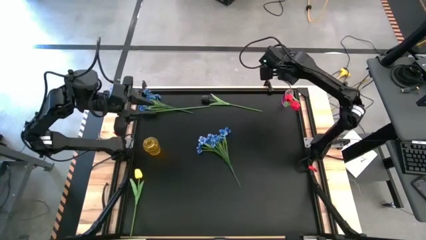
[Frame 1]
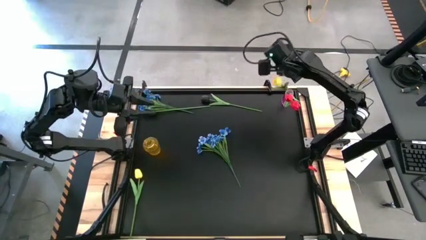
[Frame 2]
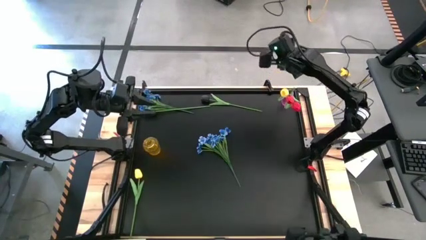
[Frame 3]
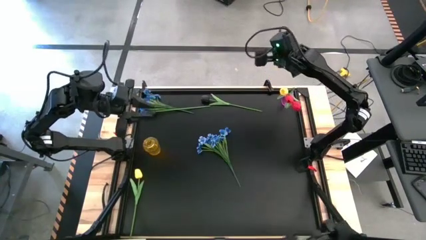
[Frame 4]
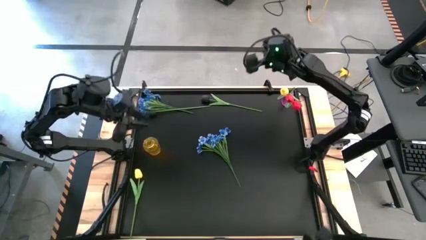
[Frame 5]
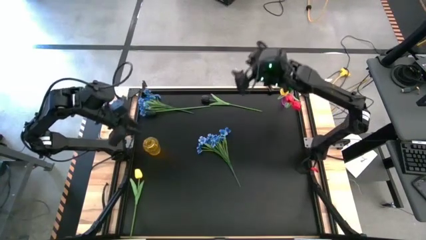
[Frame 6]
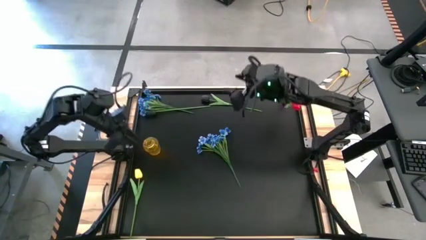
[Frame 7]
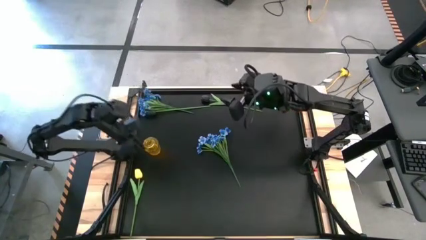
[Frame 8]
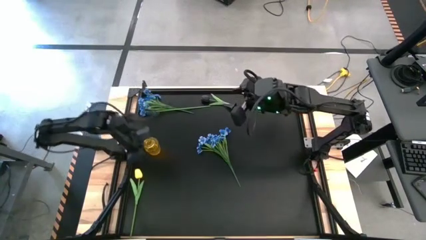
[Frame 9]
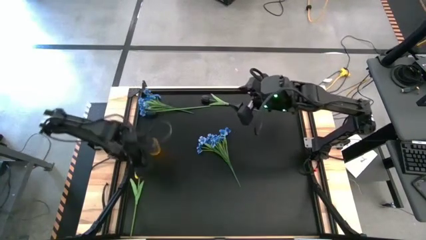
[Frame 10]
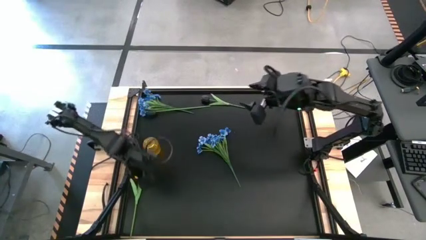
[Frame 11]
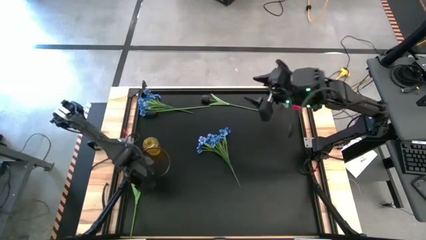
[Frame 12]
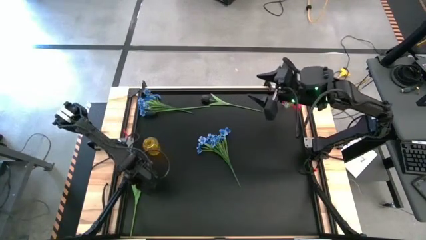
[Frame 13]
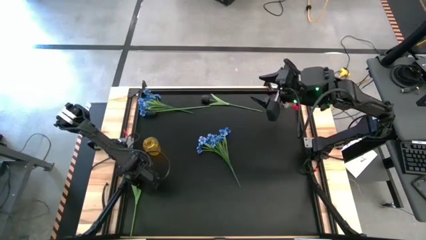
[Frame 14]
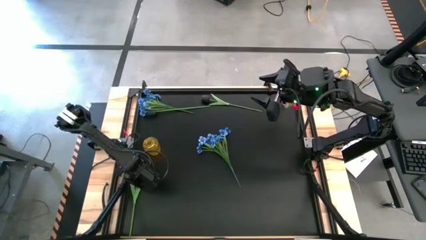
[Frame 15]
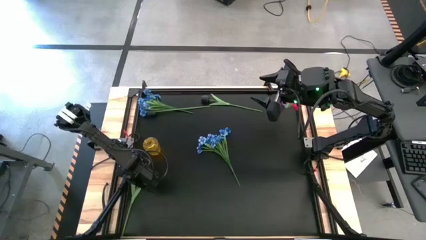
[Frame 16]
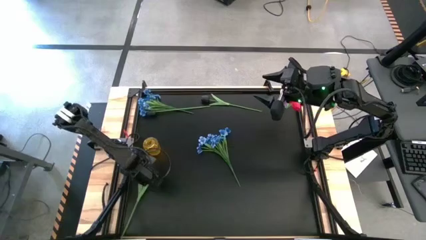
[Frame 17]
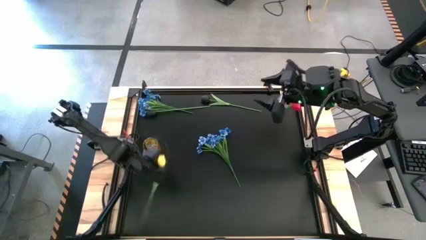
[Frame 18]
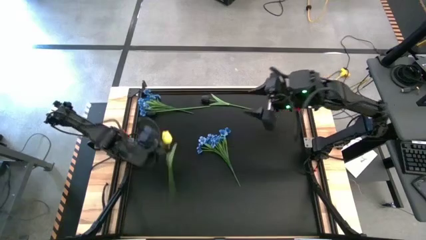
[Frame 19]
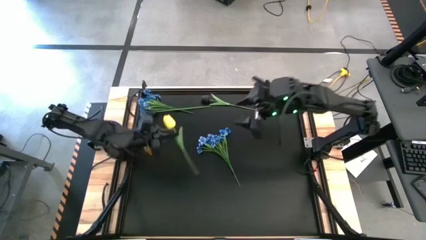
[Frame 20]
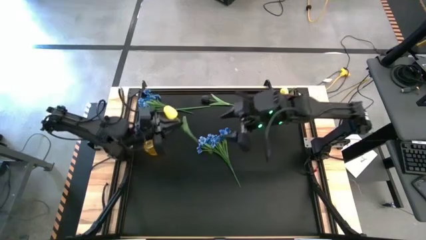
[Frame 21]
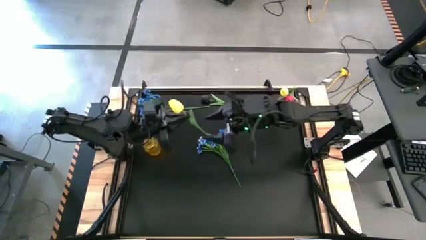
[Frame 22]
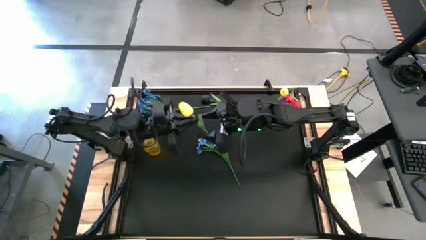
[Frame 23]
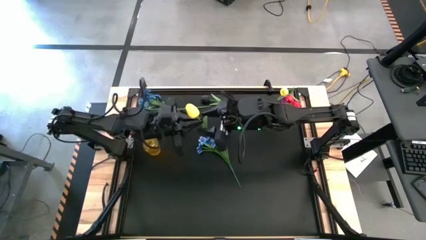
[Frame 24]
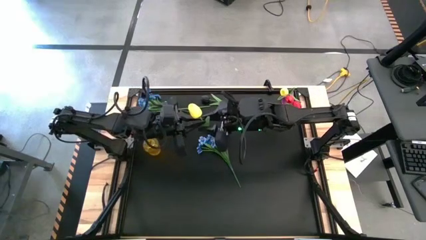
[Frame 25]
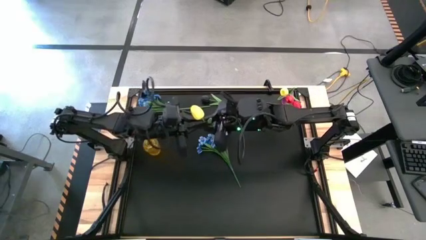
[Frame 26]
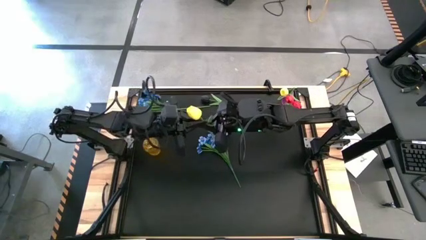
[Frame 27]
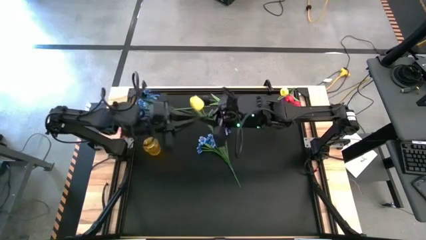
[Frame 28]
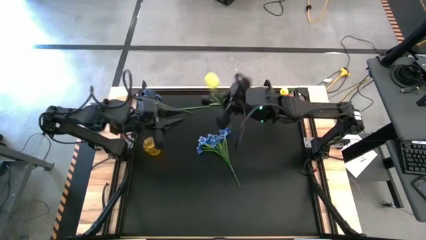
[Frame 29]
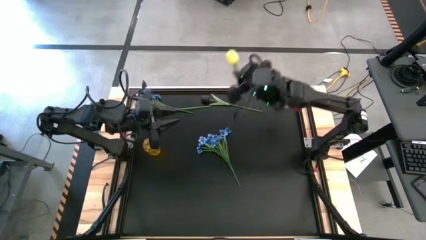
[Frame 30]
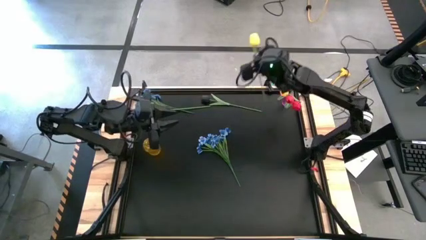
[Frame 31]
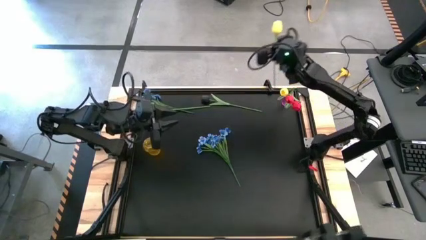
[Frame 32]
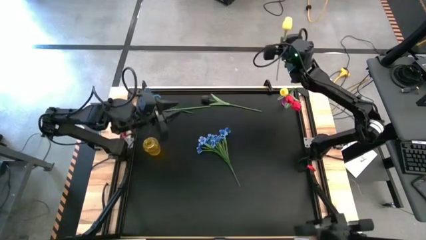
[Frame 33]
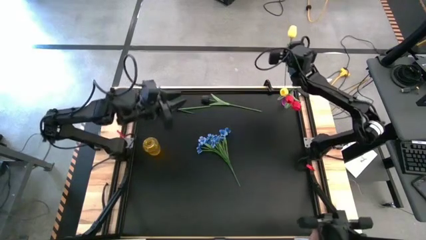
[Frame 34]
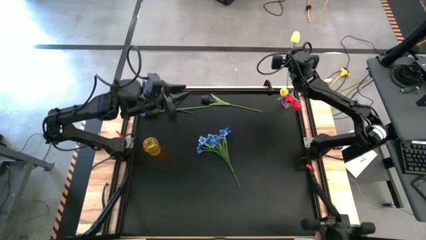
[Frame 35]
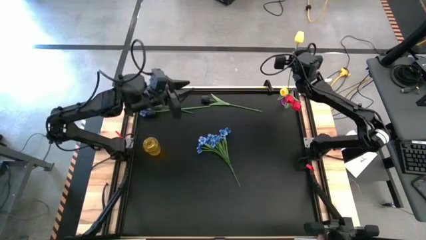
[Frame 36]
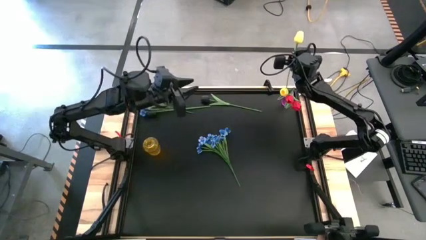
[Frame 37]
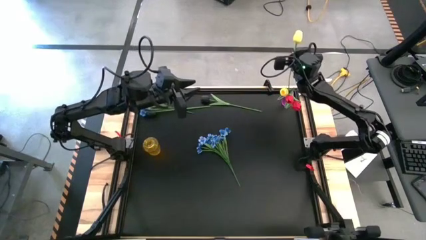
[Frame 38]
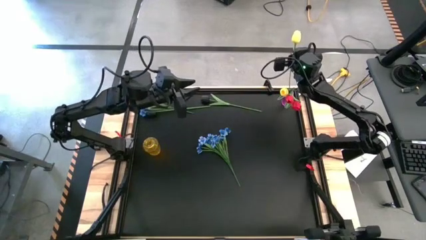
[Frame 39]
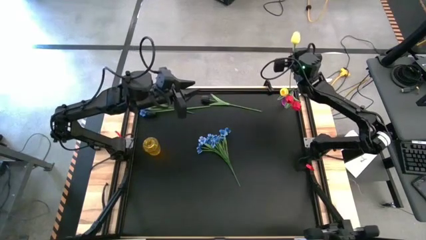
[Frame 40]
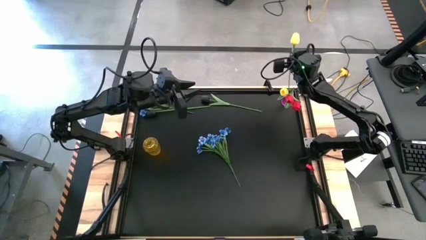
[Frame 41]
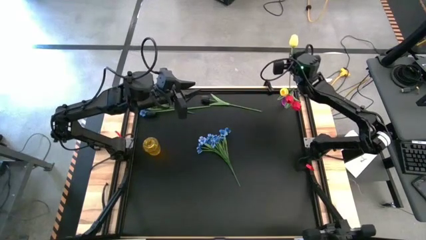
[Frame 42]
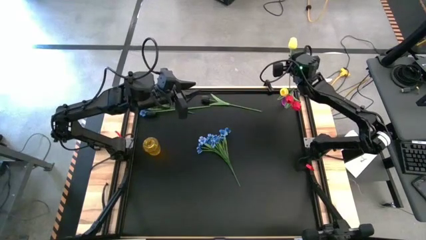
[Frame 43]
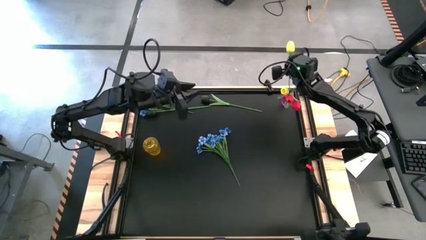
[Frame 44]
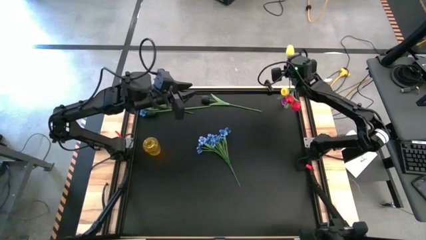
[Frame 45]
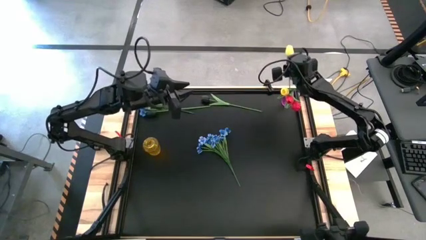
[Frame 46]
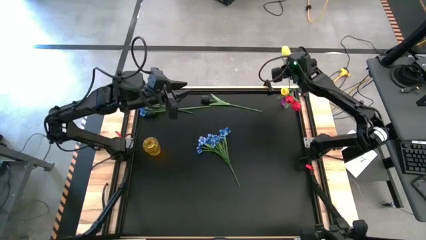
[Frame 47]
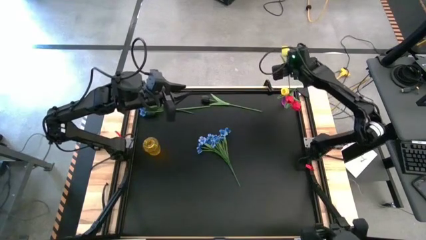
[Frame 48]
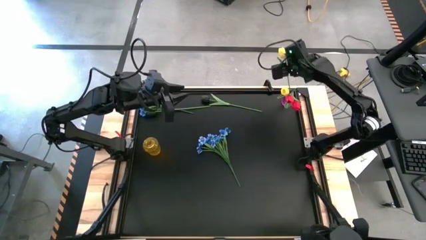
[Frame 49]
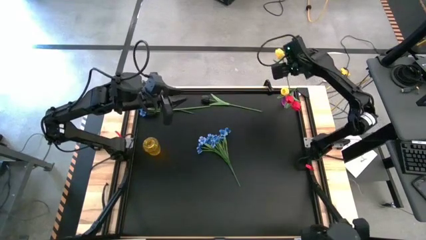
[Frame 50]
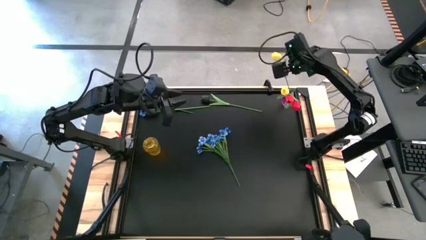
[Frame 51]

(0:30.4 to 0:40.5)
Task: Sort flowers into vase by color
Put the yellow flower into the purple vase

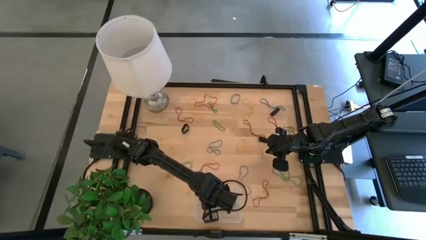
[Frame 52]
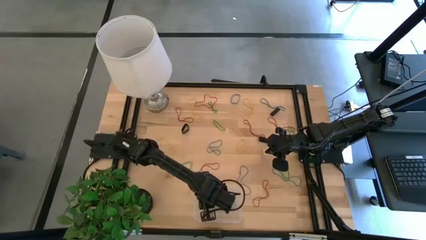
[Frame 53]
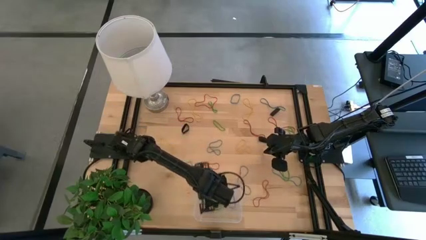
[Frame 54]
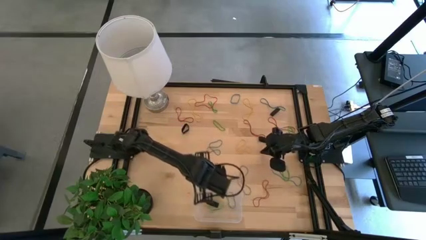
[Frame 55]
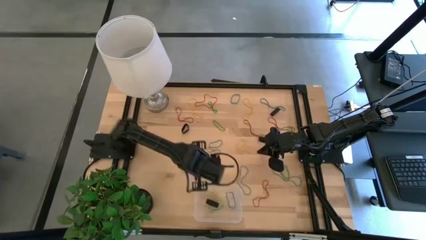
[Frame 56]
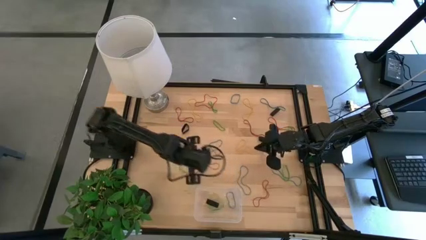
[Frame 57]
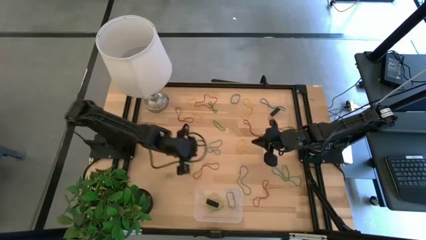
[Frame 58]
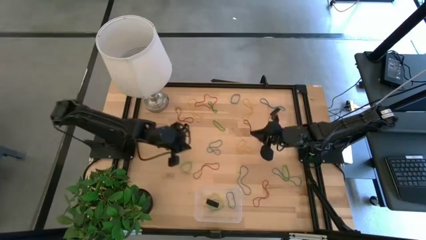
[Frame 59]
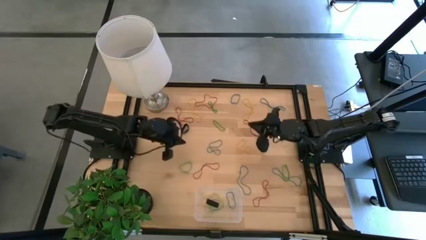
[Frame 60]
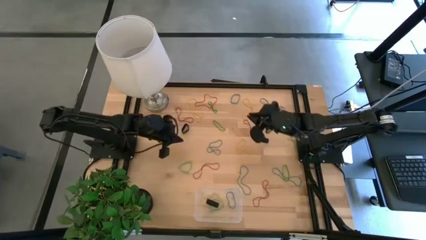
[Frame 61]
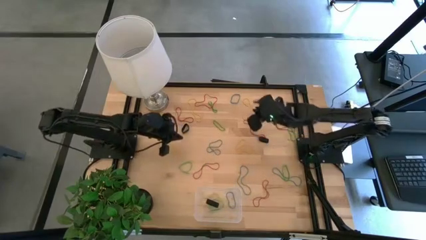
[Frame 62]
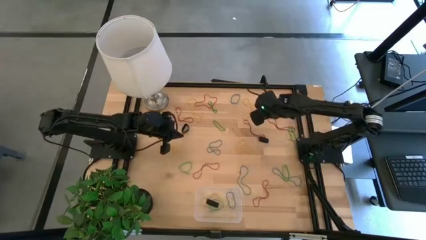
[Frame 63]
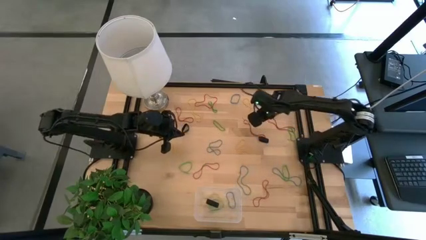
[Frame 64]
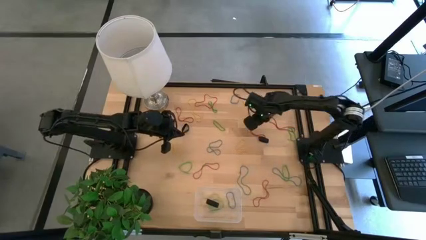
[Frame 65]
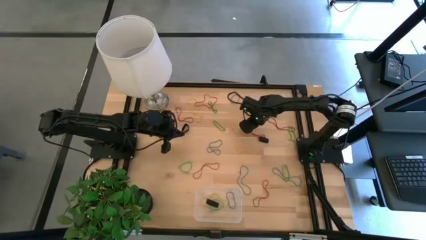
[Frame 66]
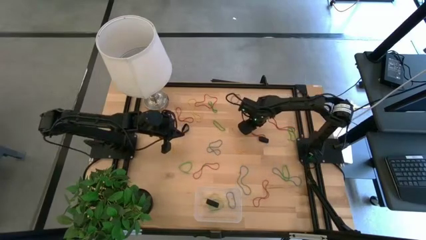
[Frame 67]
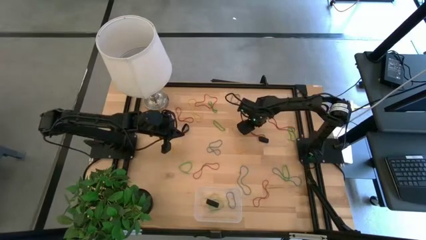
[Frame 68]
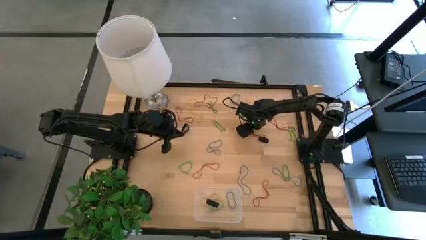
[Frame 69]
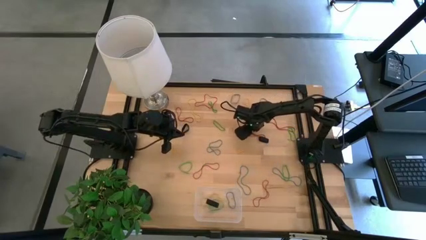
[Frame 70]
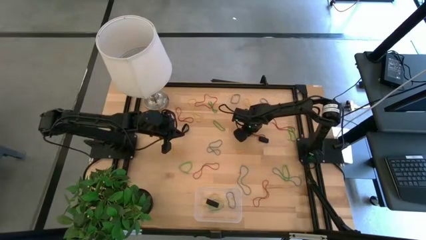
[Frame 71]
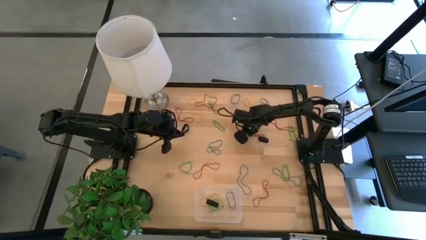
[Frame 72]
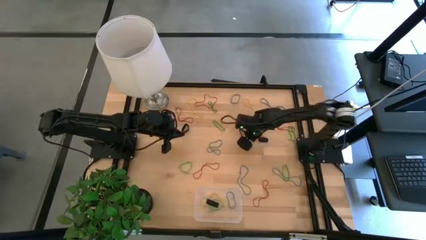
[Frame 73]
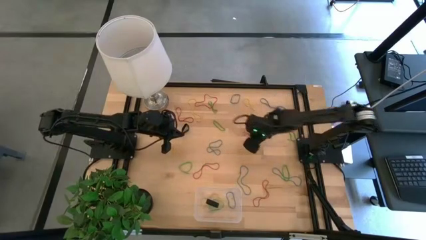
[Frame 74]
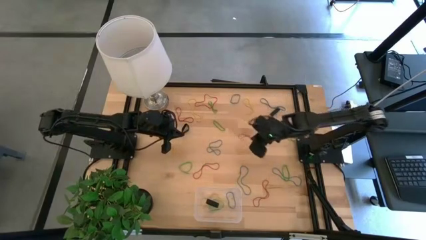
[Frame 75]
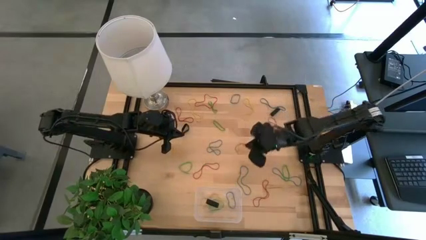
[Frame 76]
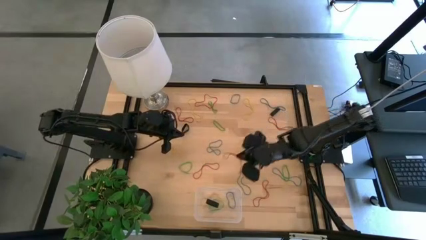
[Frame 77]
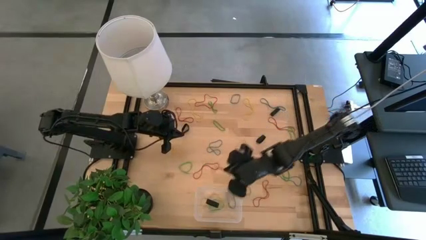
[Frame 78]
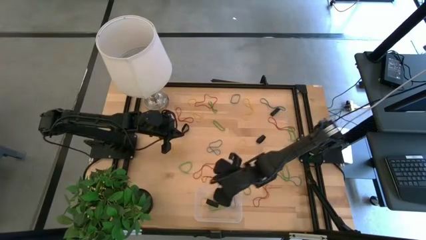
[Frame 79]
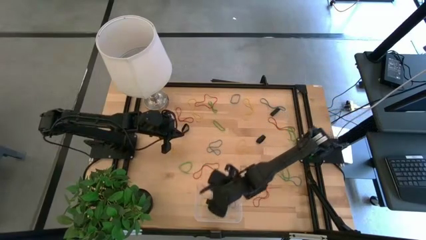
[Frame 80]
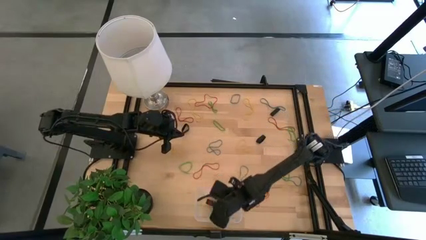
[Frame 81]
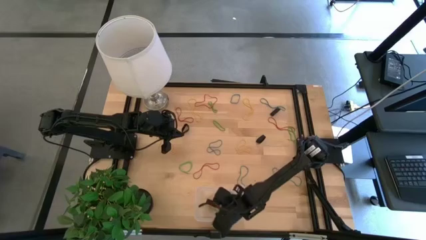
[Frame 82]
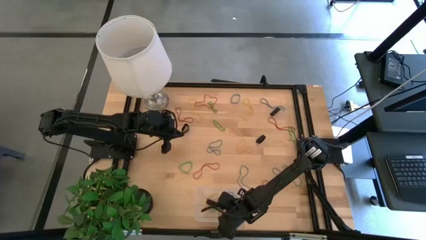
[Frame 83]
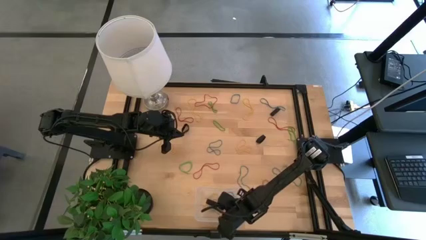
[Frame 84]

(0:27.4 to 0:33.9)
Task: Pick and place rubber bands into bin
Put the red rubber band into the transparent bin
